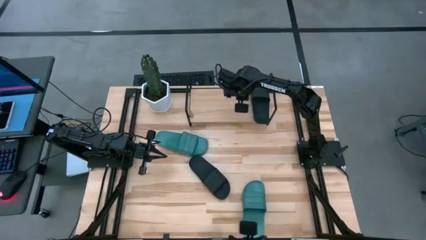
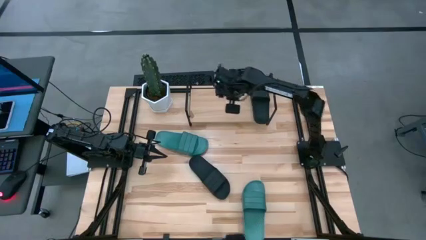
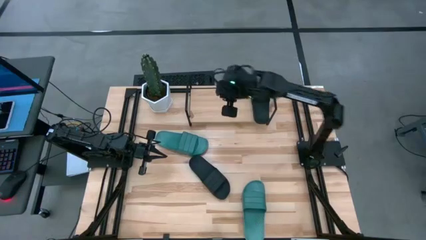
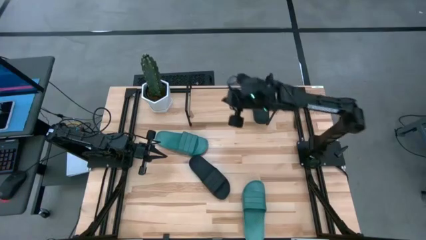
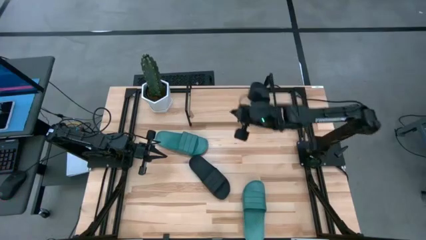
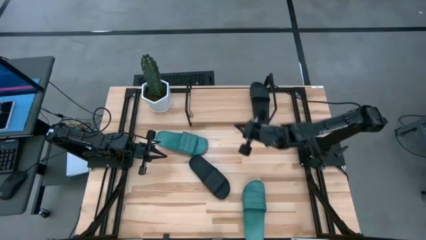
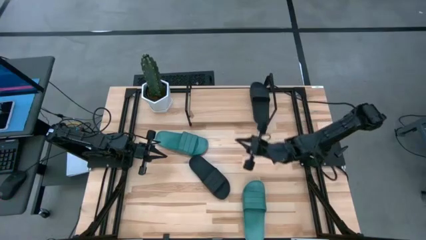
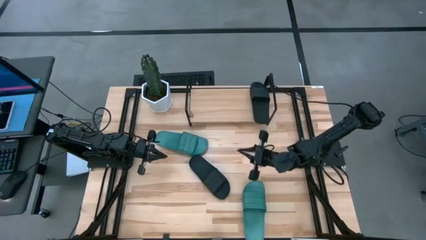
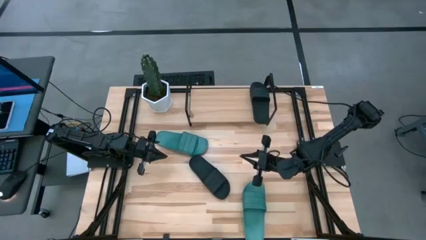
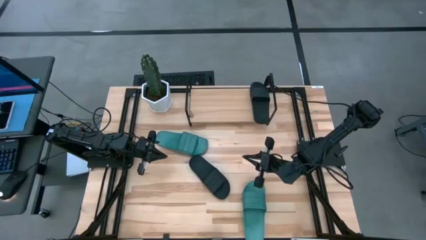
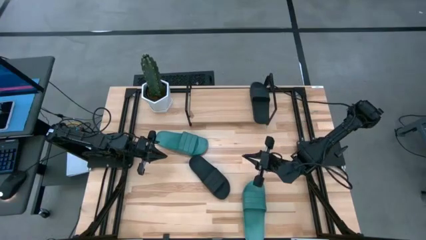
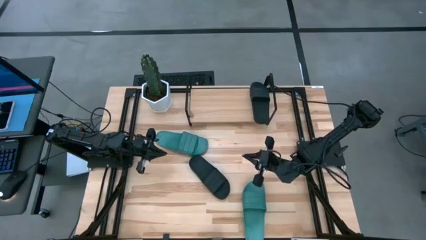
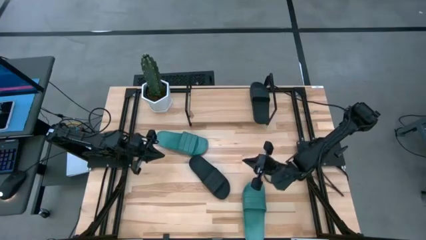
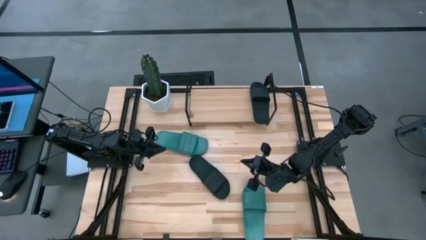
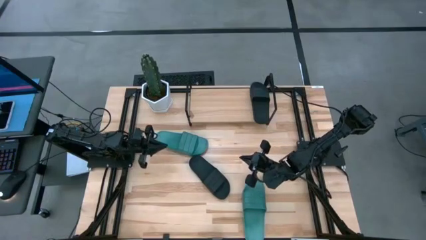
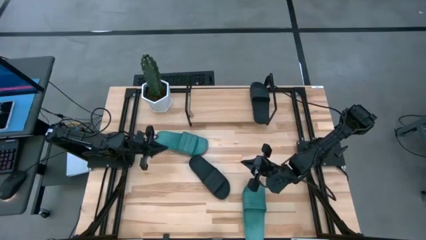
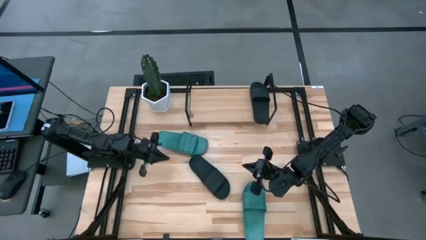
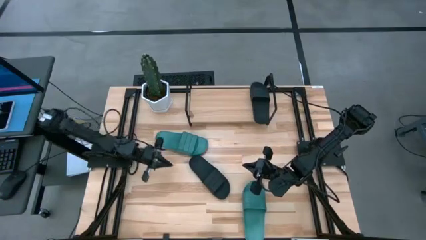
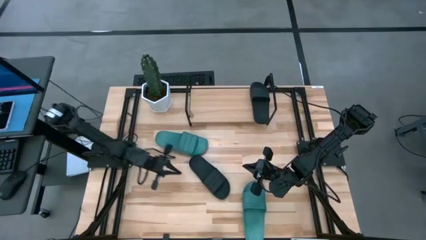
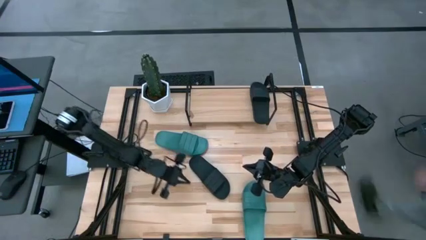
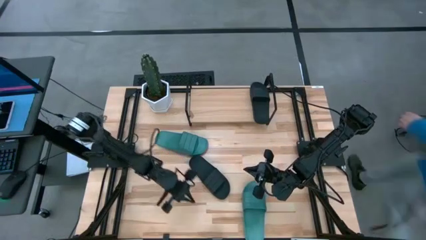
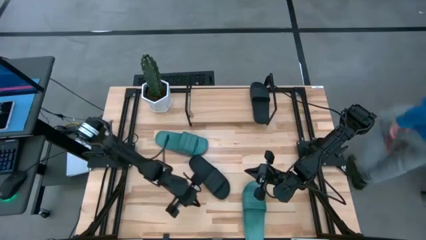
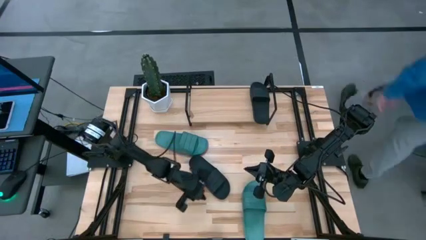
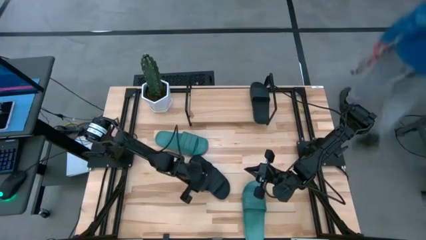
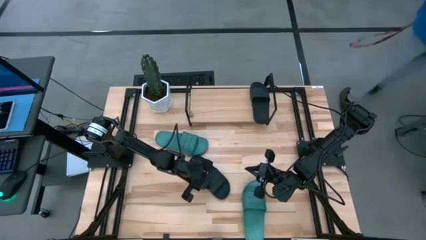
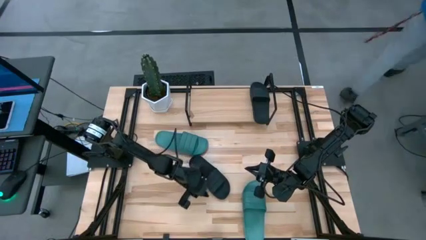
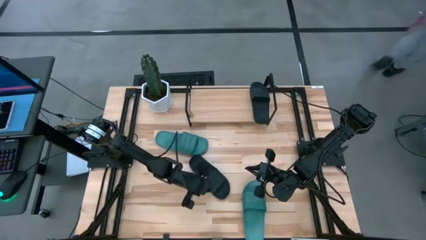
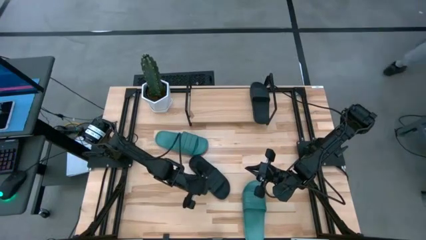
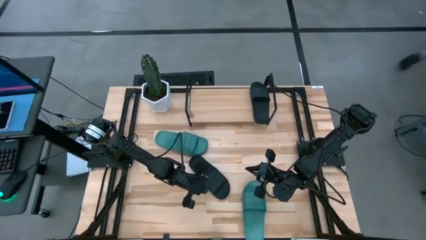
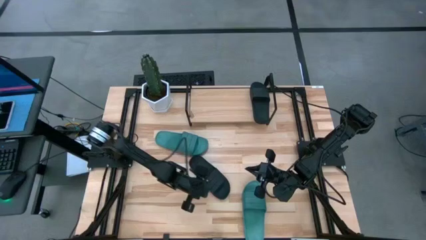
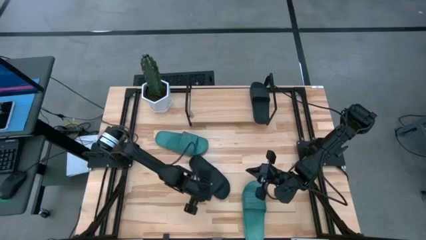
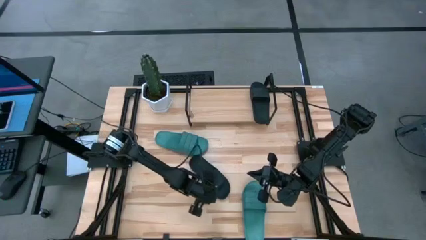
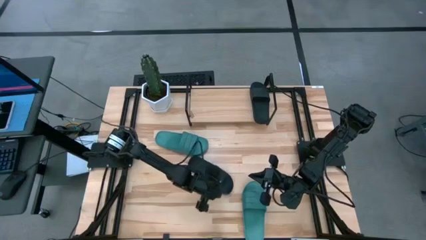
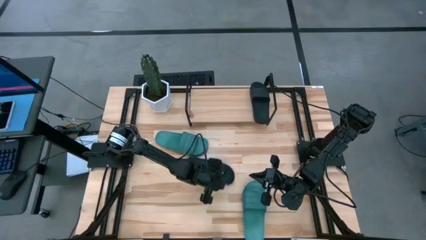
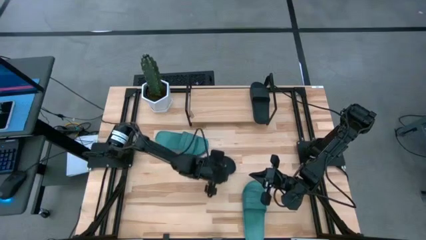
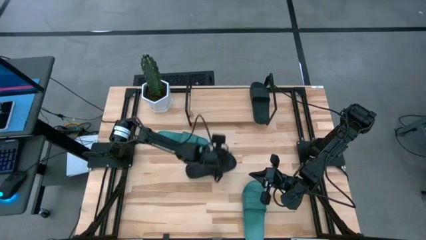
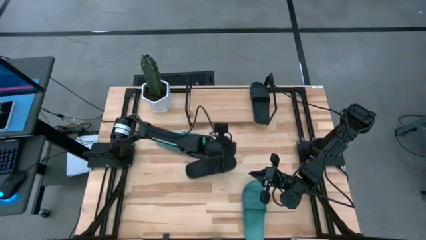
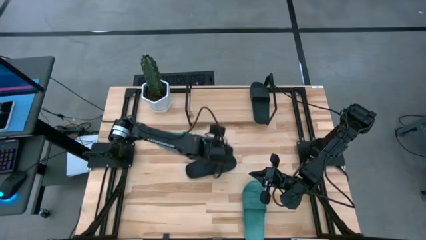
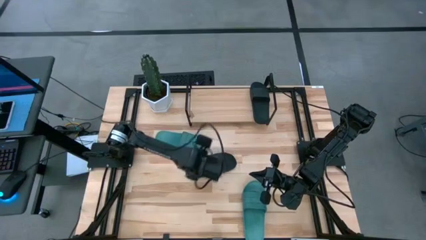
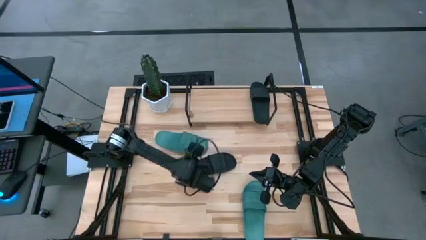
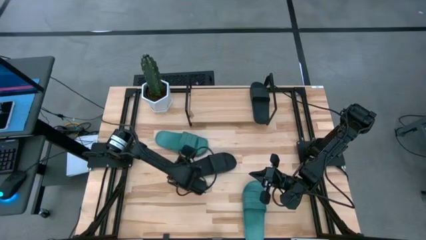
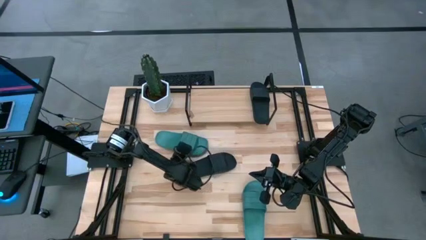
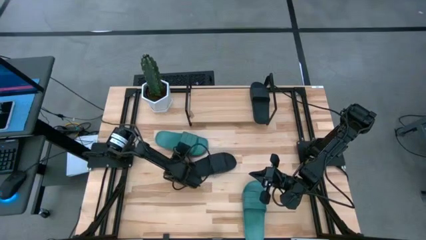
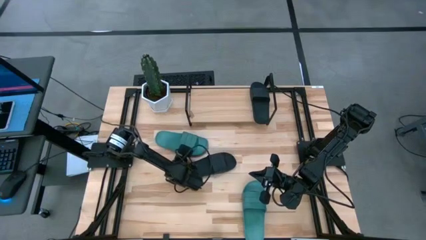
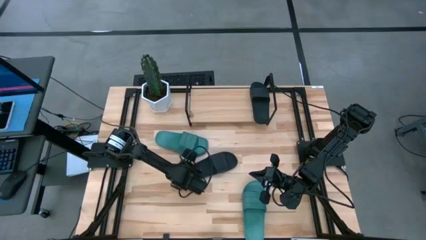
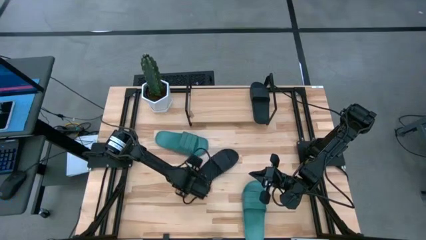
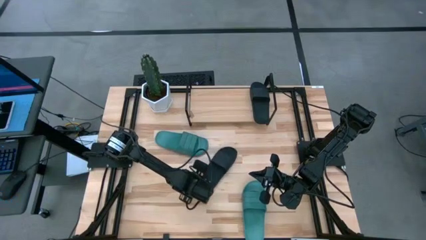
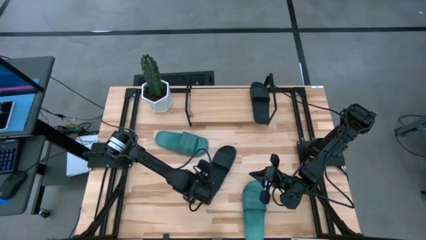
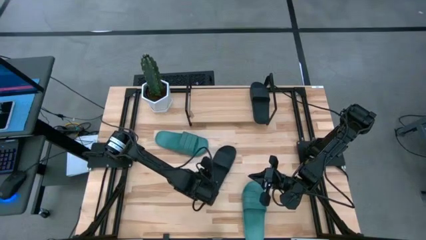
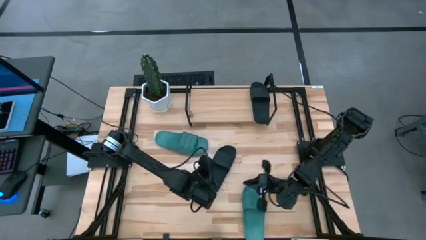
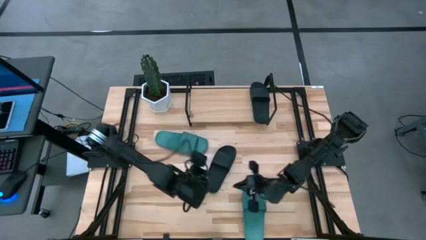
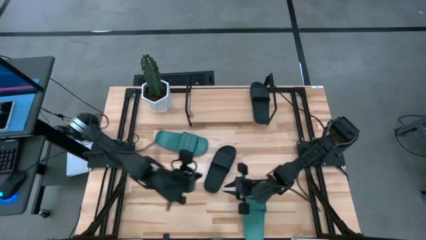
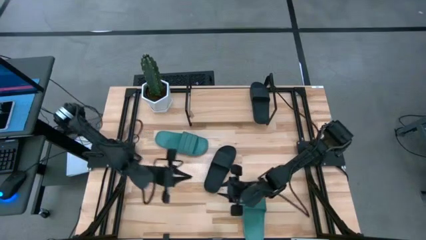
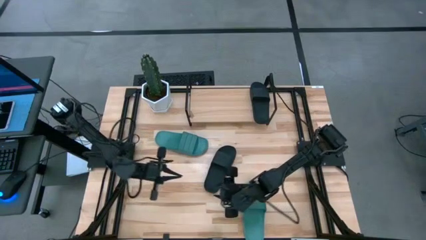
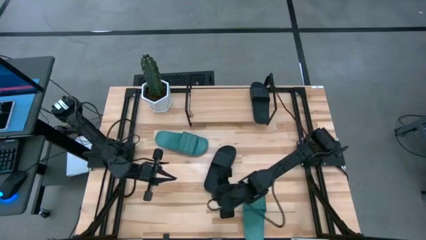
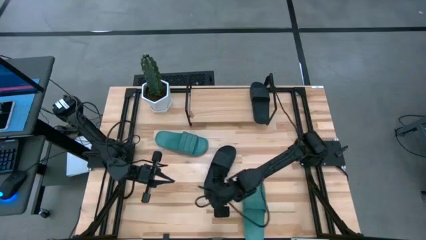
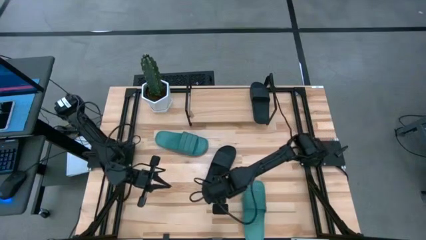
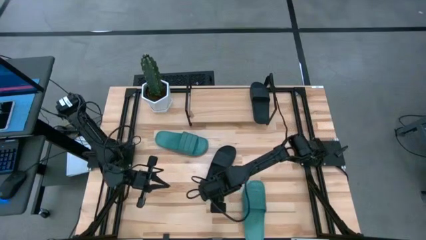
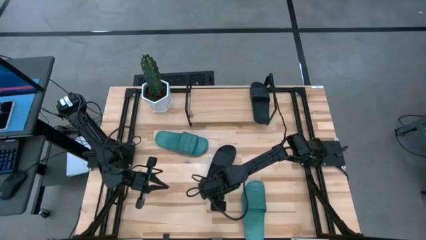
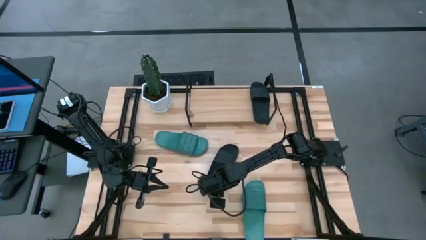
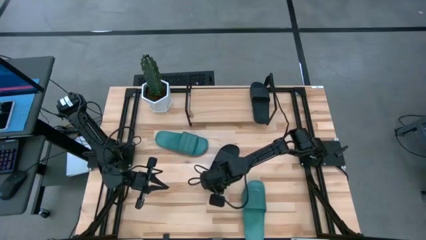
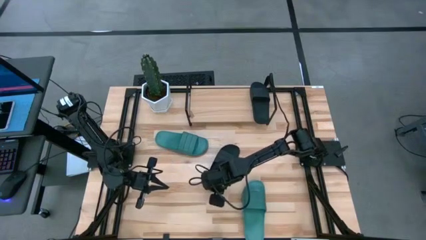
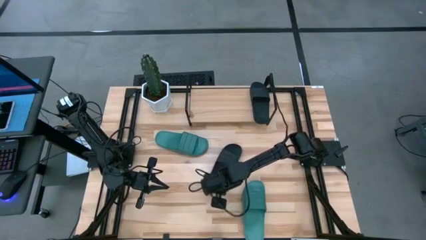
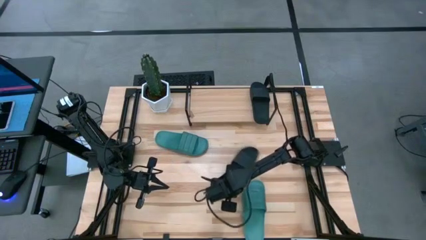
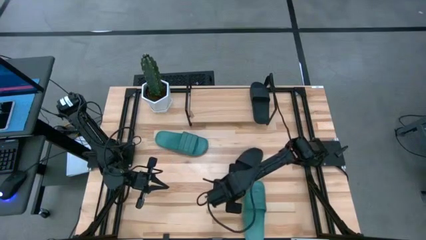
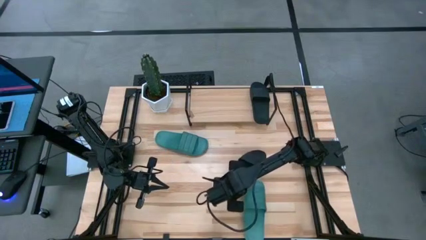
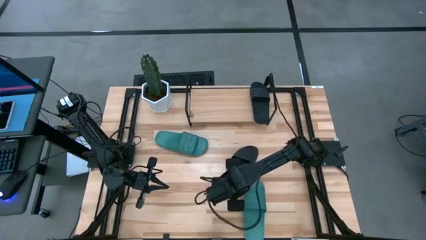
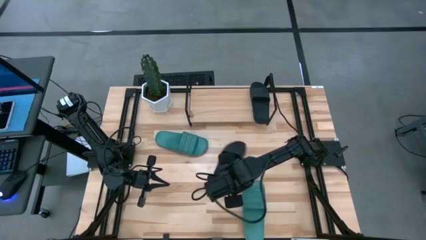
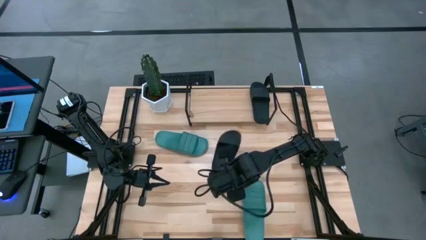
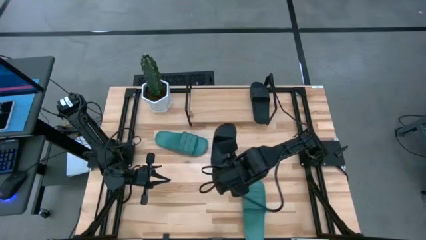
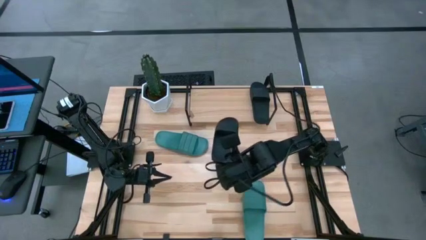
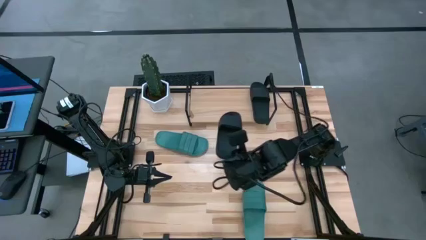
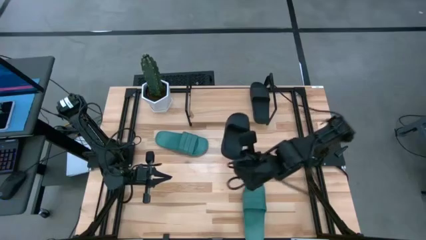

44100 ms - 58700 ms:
Task: Pick and place slides into the shelf
Put the black slide on the shelf
